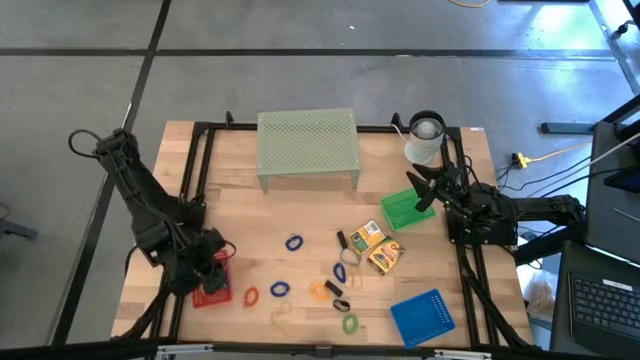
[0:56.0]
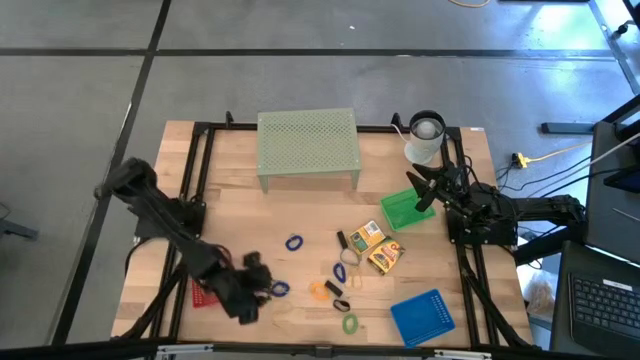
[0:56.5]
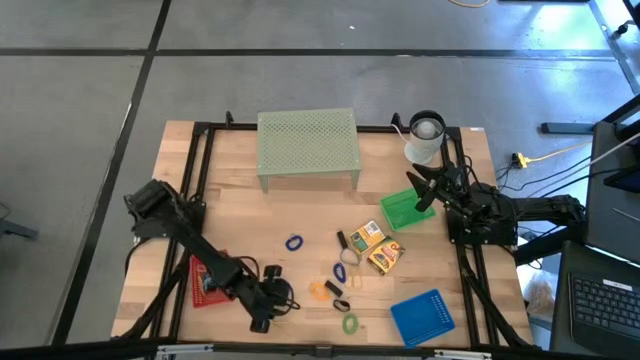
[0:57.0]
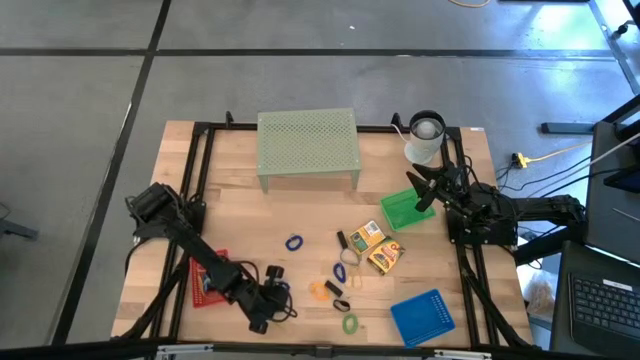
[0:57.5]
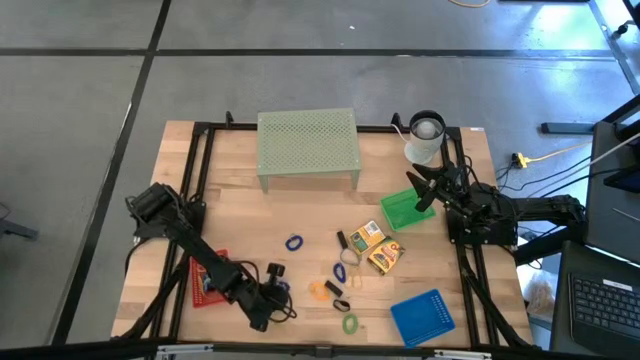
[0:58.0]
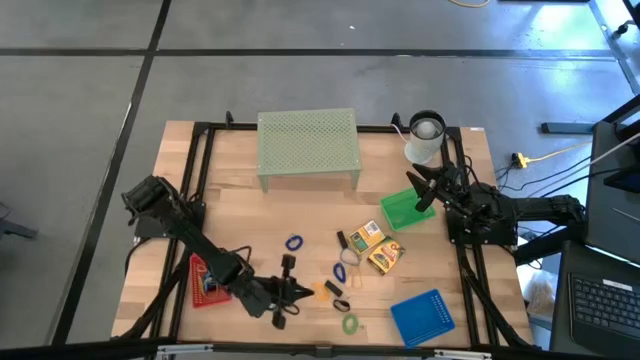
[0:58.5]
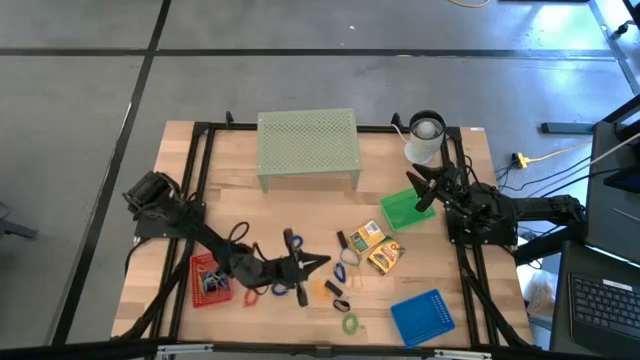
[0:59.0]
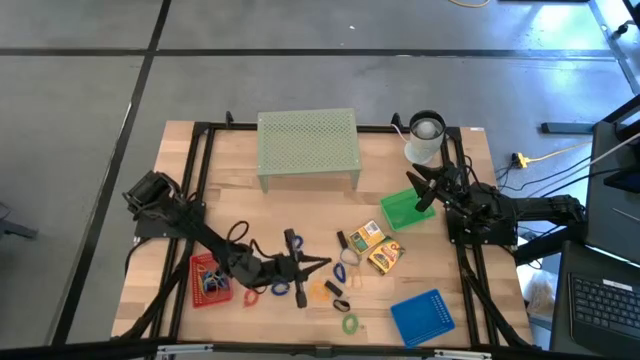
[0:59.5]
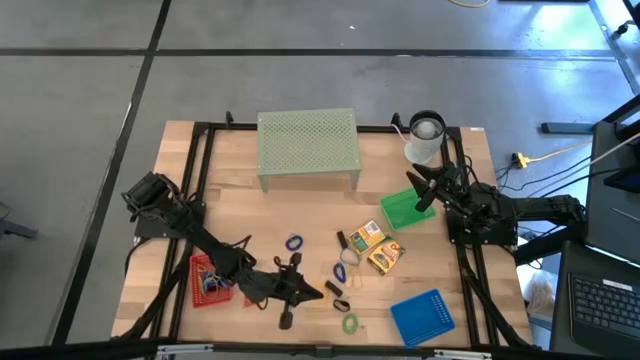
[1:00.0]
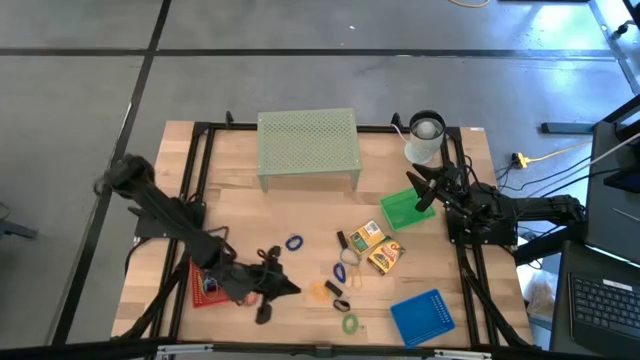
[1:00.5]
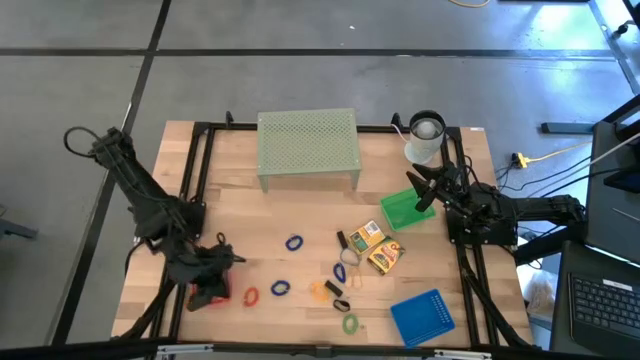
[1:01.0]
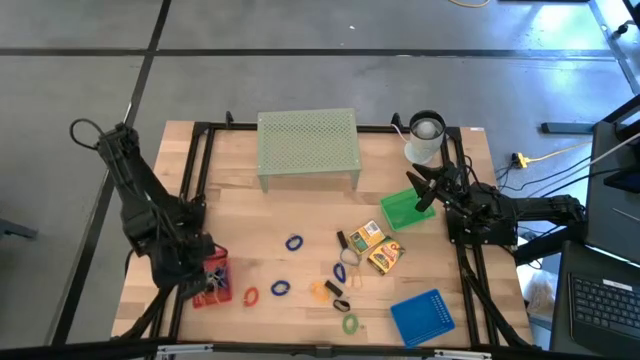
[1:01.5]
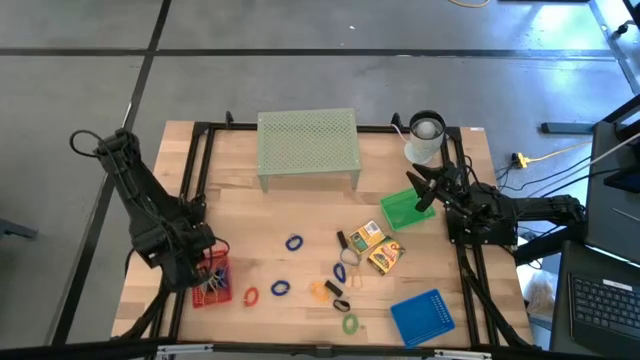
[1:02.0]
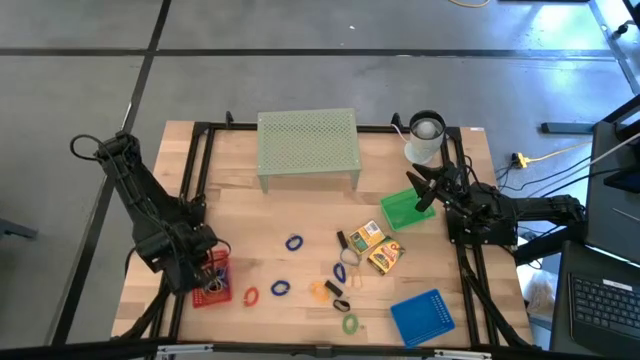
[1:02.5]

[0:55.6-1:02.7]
Task: Pick & Place Office Desk Supplies
Put the yellow rubber band into the red bin

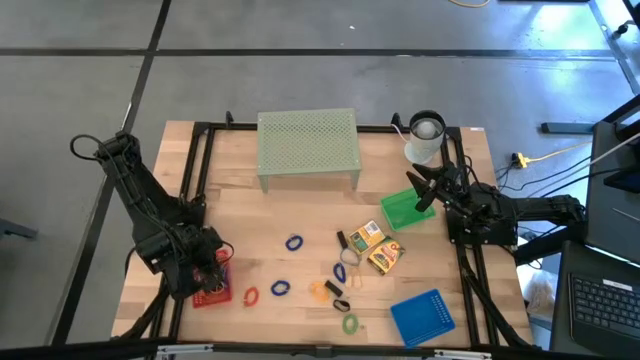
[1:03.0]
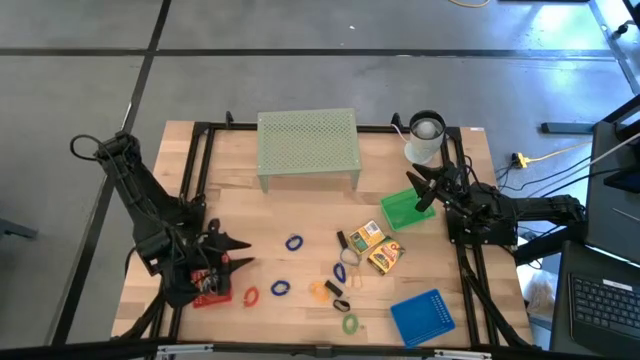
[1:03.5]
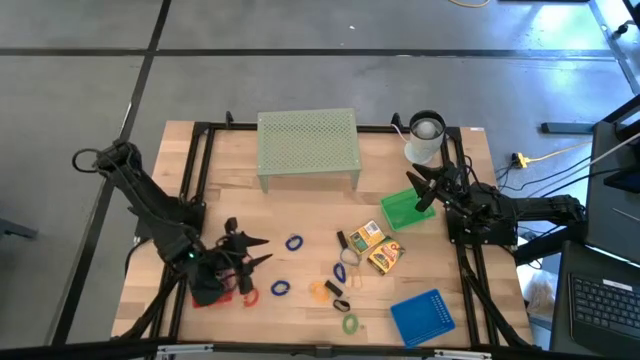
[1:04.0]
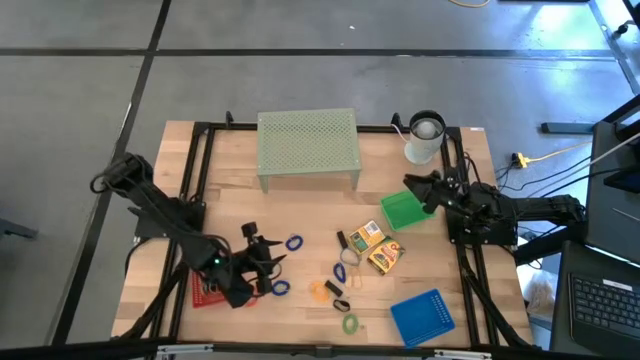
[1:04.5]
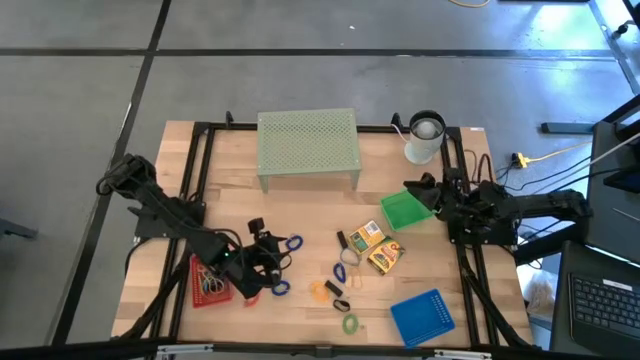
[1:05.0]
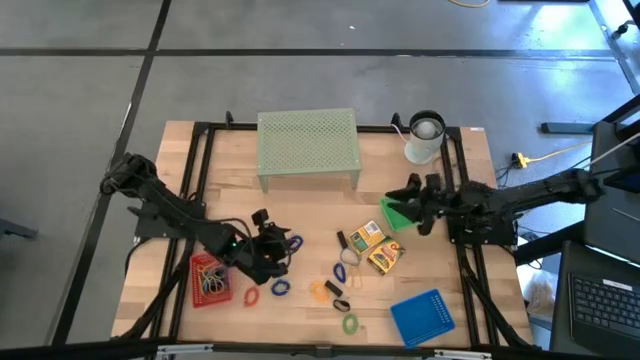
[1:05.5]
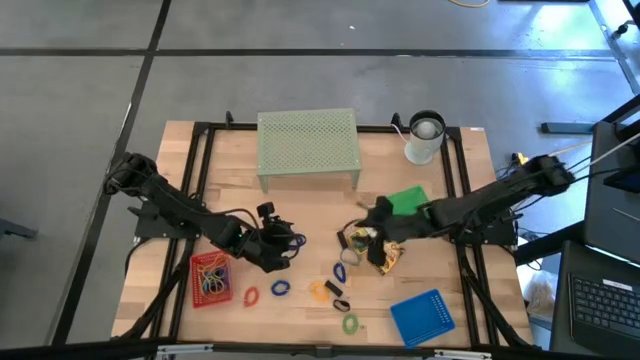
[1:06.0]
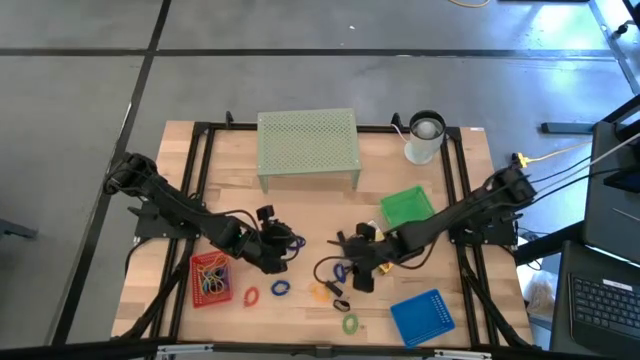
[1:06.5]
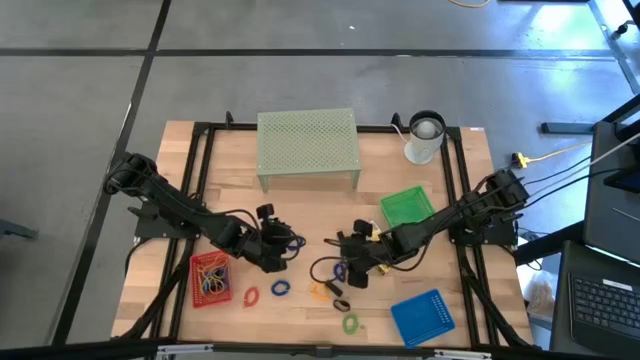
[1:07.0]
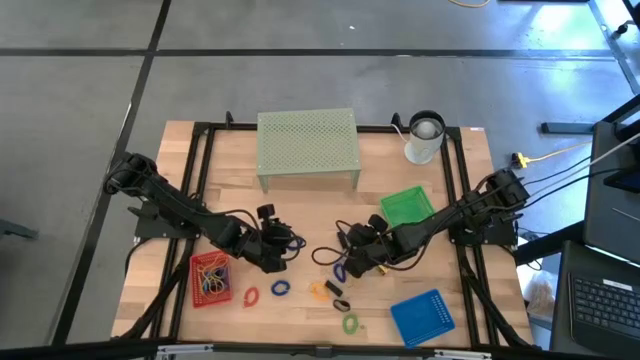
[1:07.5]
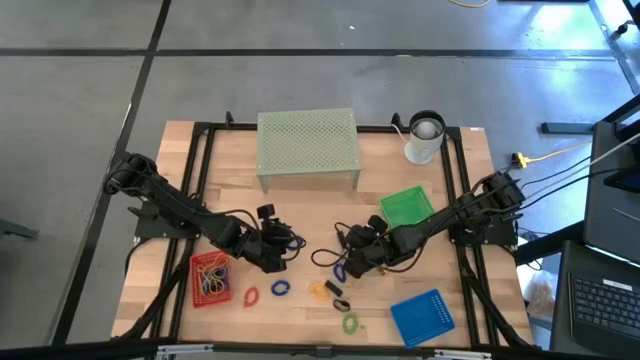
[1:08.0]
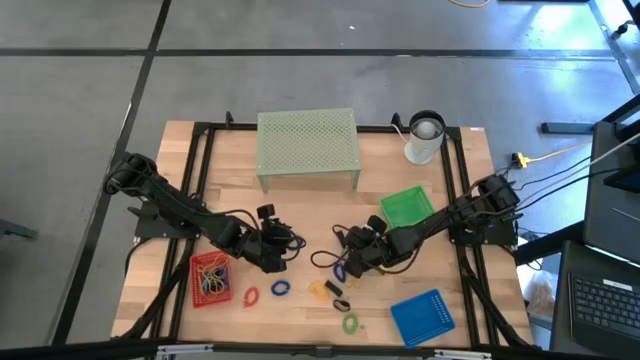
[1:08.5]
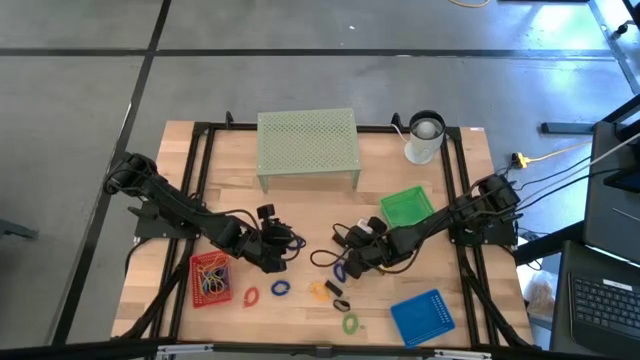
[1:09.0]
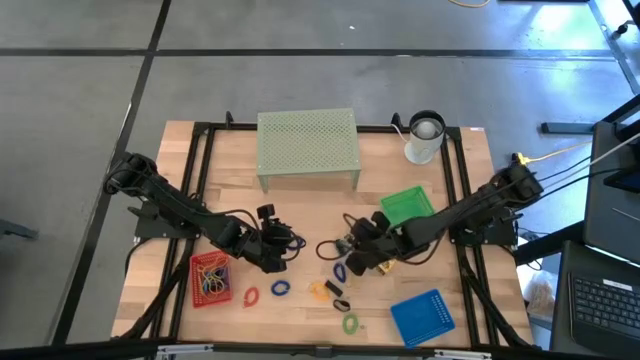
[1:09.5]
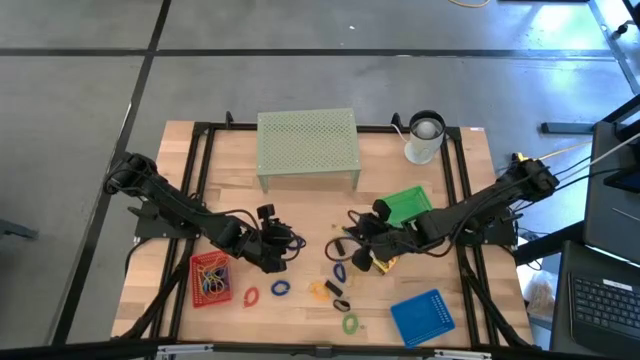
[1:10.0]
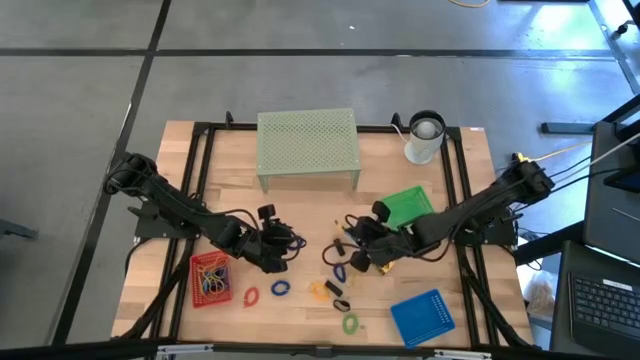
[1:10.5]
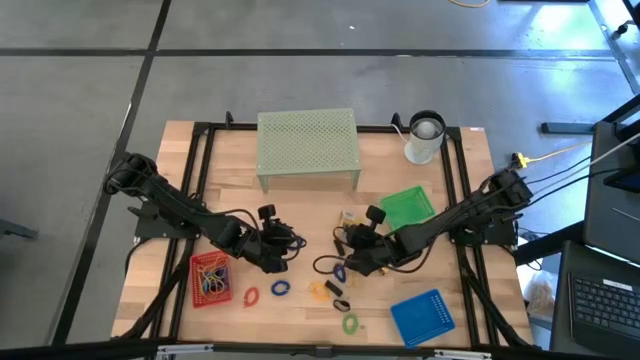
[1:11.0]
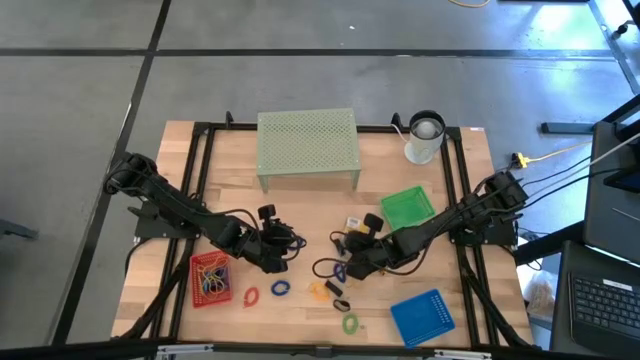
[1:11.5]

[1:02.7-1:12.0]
Put the crayon box into the green bin

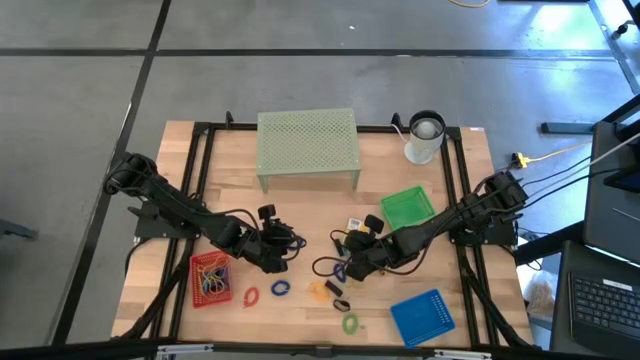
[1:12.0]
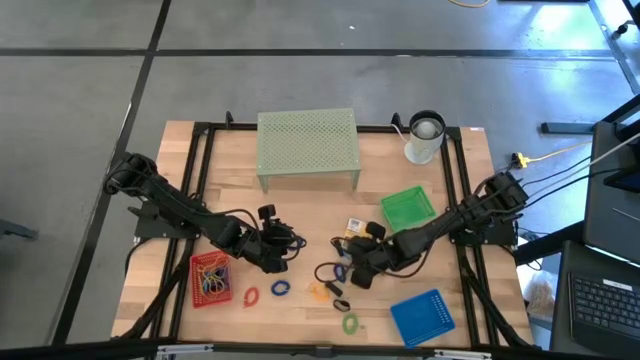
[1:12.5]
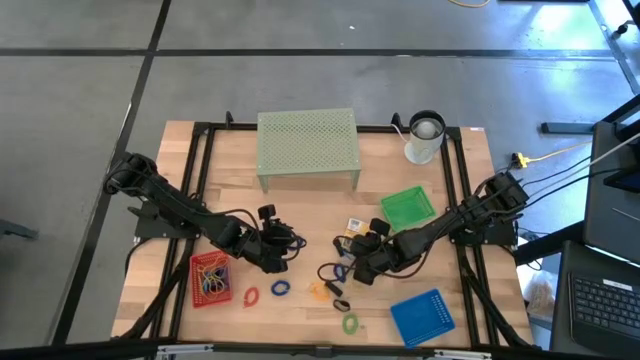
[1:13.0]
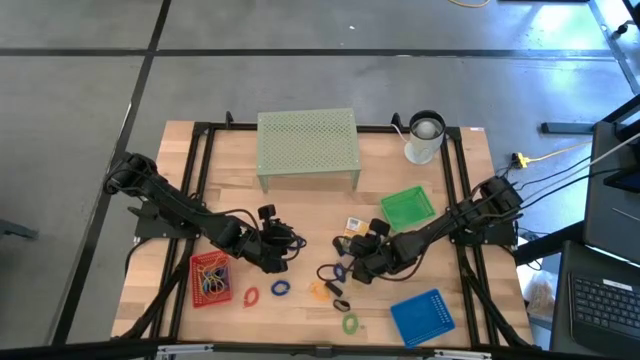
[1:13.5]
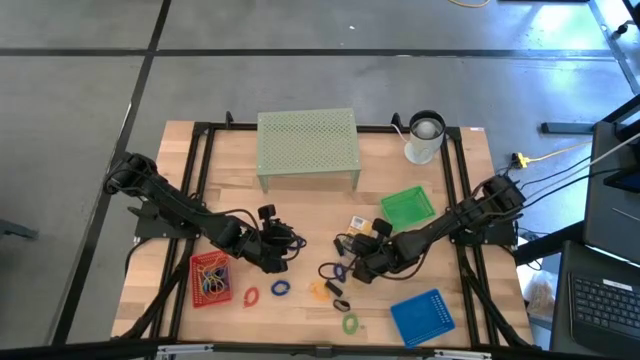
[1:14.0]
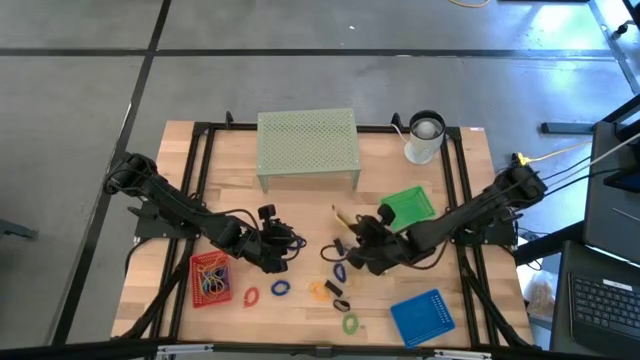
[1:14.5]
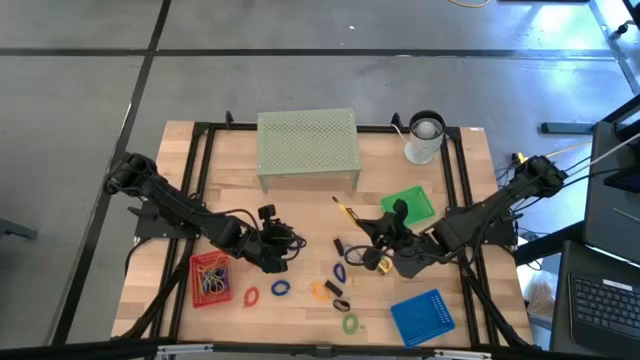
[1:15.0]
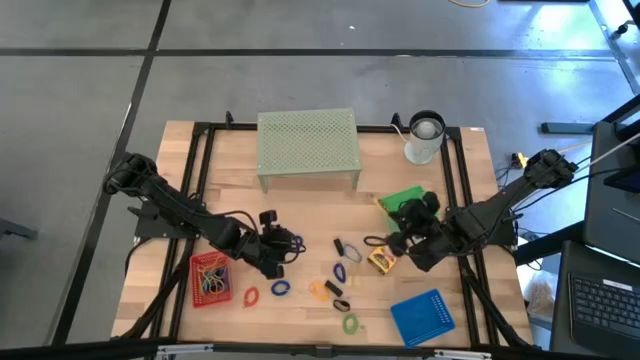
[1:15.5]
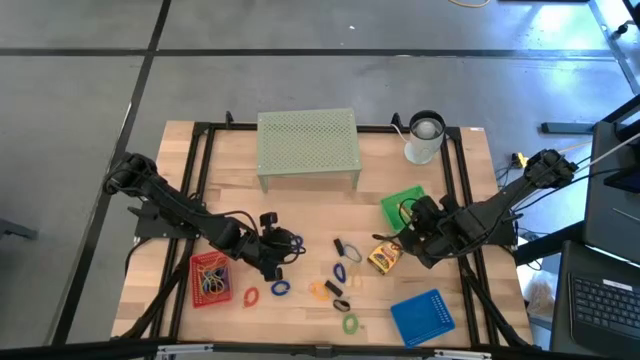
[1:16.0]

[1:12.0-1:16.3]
Put the crayon box into the green bin
